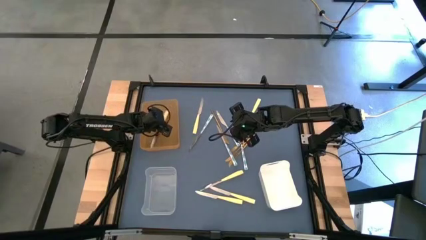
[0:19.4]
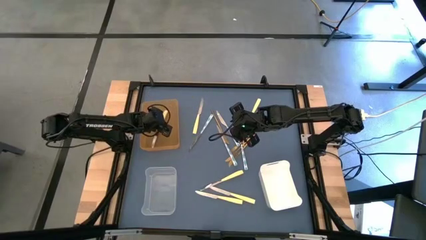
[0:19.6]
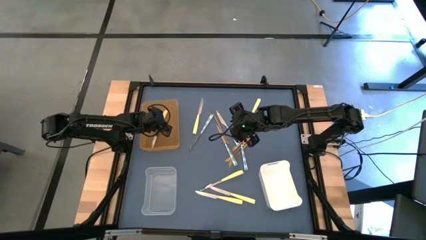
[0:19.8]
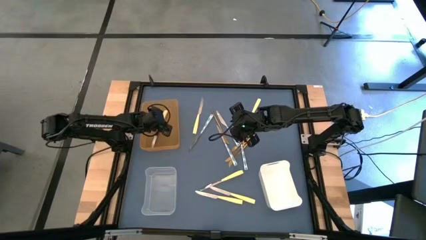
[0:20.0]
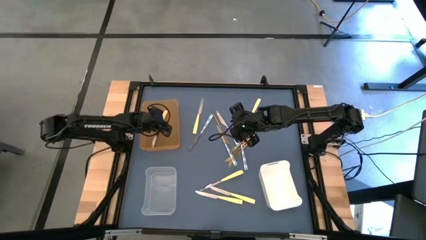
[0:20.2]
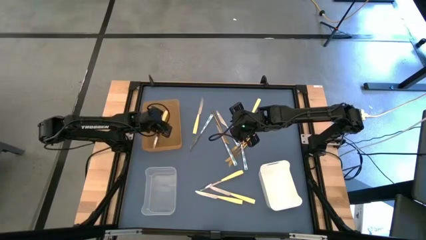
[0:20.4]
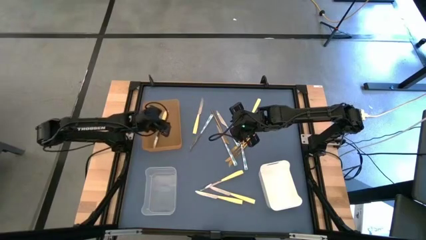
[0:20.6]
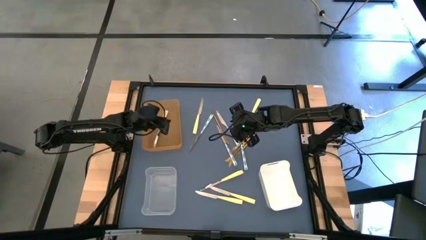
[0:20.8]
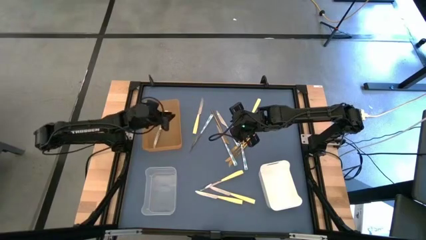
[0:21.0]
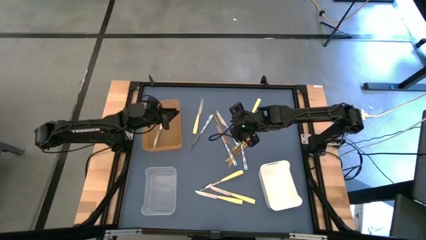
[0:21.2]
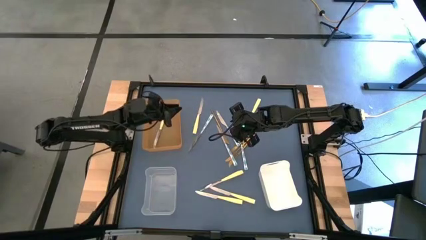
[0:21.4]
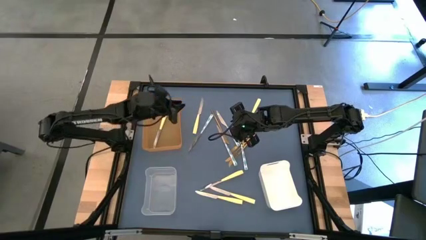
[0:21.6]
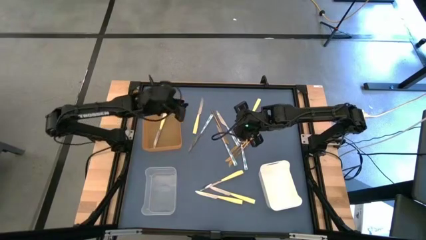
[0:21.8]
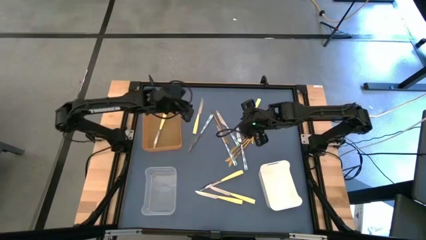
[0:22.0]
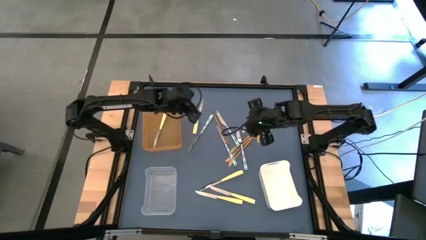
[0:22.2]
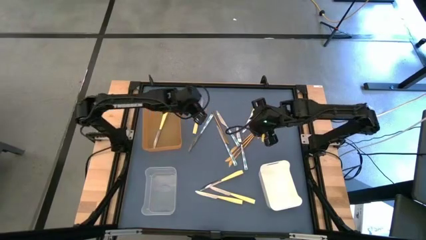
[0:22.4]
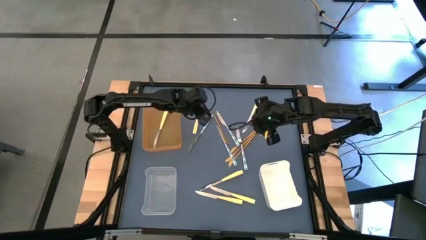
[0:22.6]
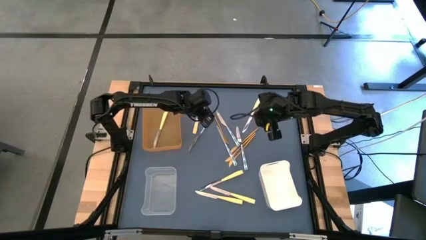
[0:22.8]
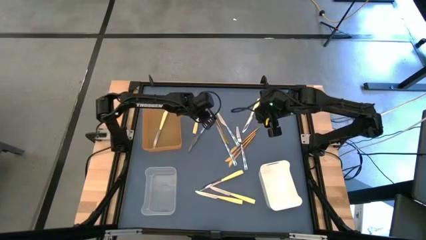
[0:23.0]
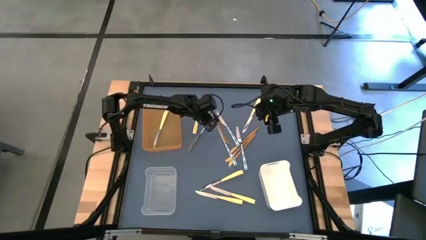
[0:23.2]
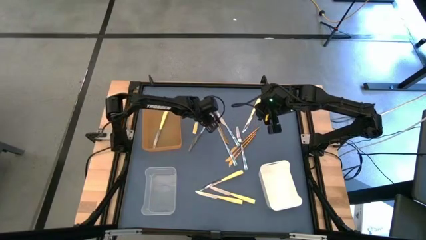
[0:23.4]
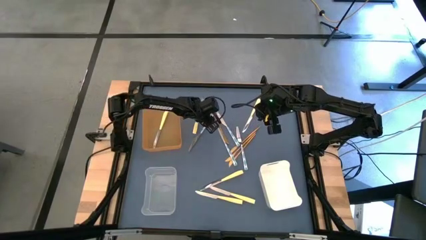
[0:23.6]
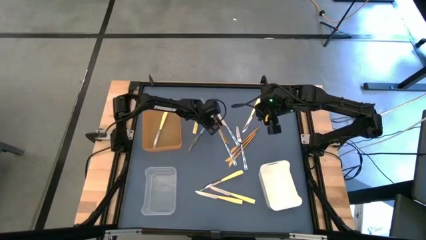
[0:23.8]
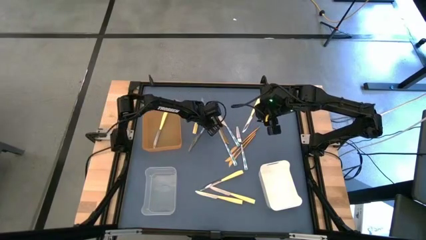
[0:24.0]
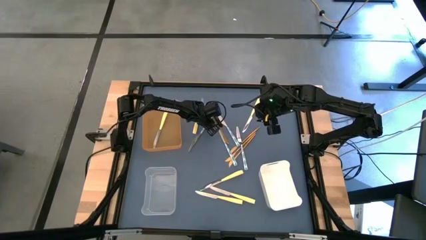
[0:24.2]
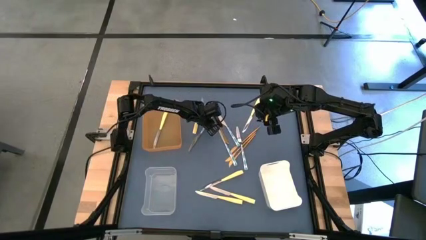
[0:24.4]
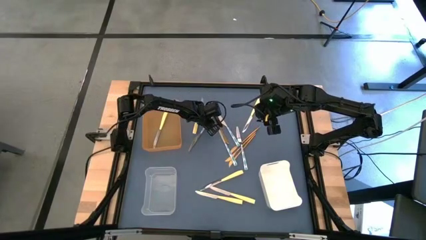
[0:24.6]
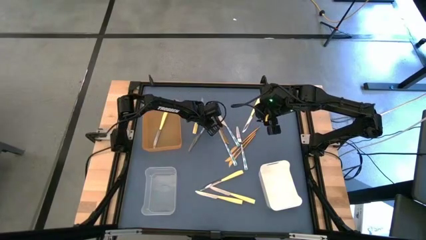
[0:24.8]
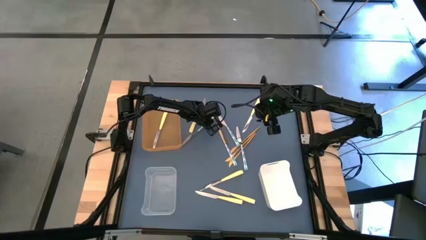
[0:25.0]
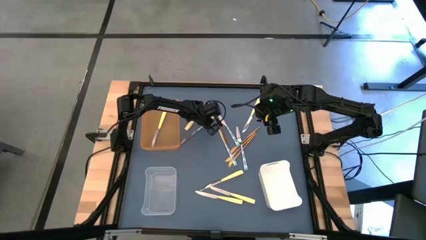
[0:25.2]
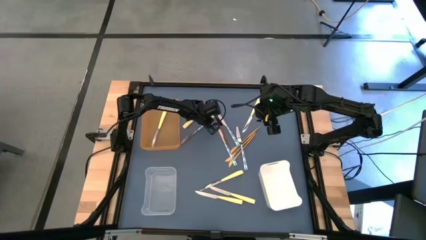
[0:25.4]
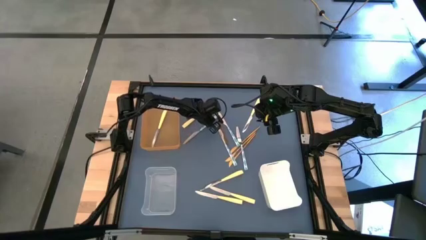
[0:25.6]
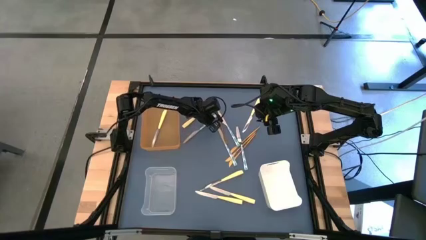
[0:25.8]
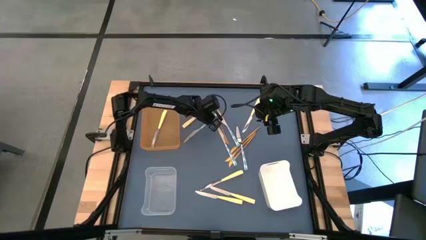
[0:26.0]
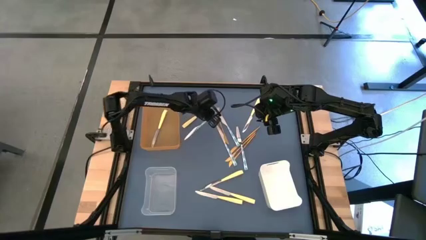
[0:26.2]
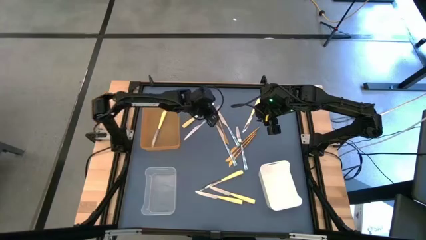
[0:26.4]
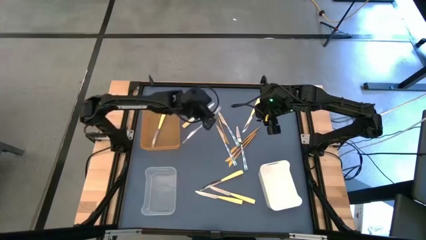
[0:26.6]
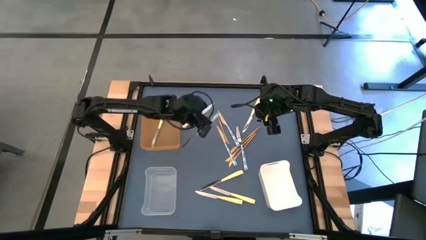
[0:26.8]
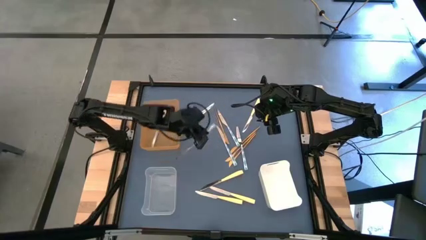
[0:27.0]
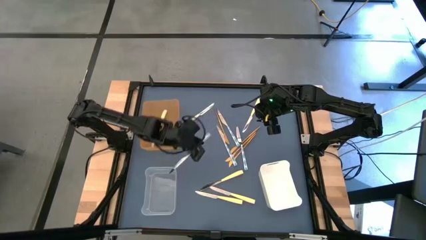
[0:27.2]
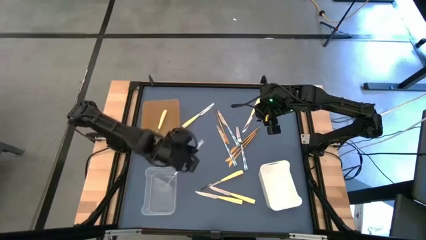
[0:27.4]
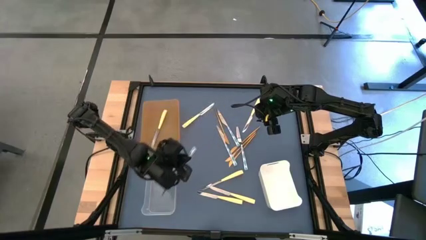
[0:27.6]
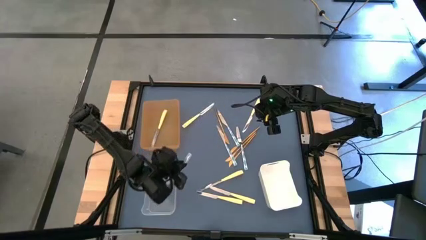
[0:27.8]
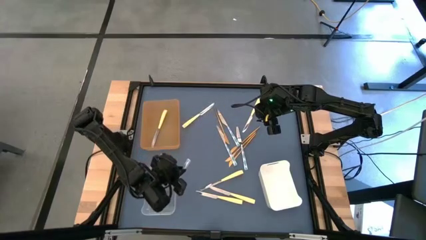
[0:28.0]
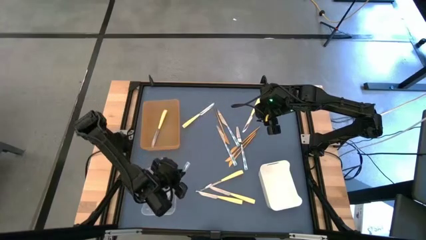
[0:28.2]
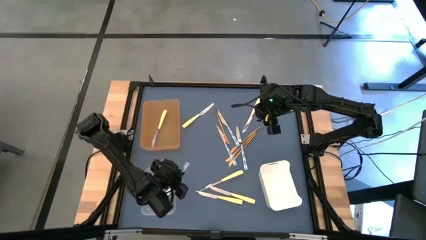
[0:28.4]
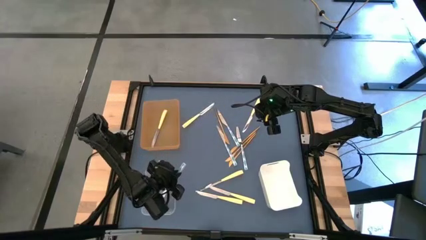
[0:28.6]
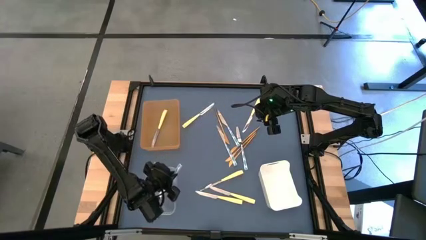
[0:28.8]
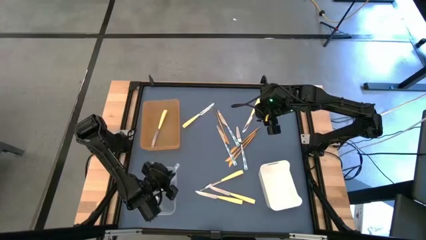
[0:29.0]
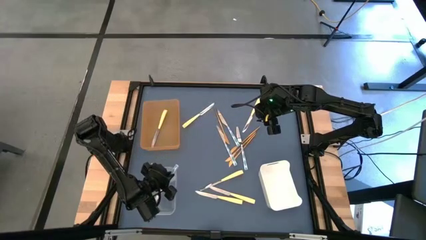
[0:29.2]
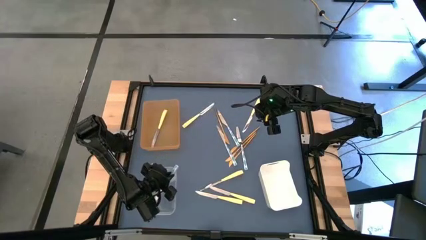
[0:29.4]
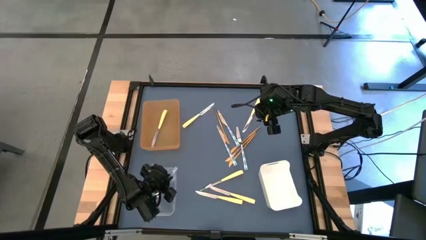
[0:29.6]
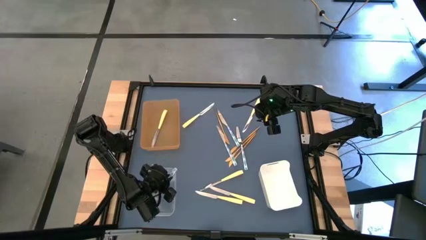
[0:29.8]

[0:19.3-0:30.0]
Task: Sort silverware by color (type)
Put the green knife into the transparent bin
